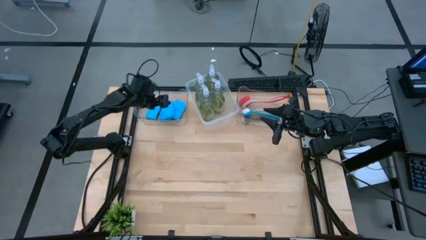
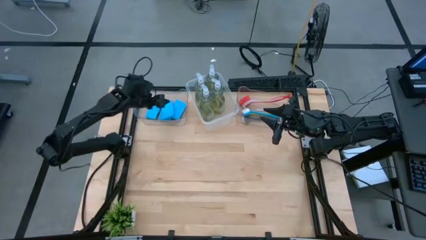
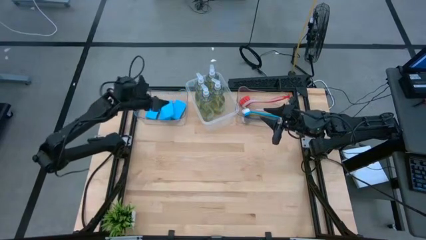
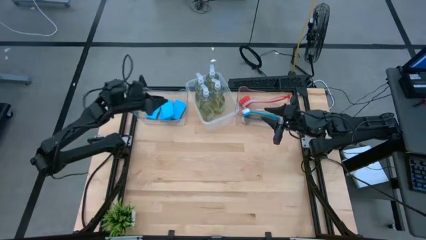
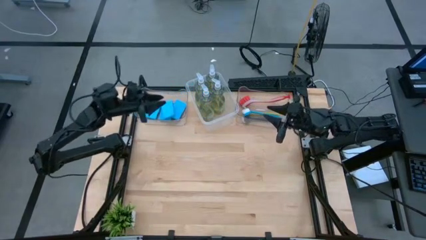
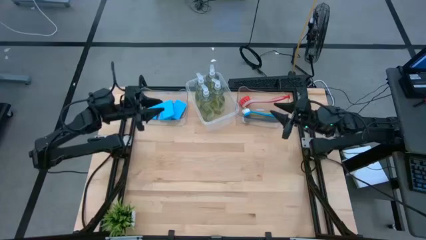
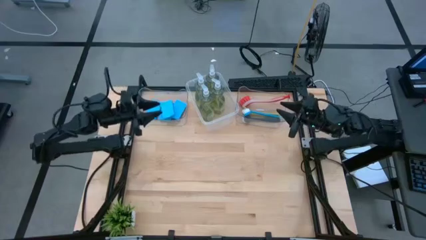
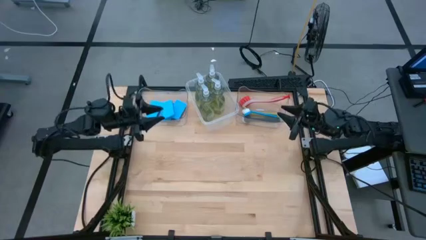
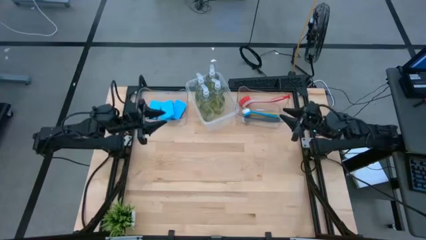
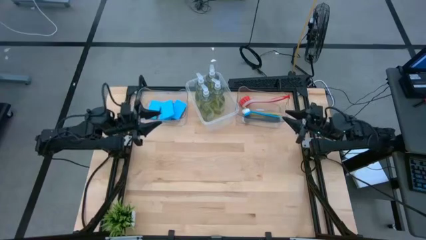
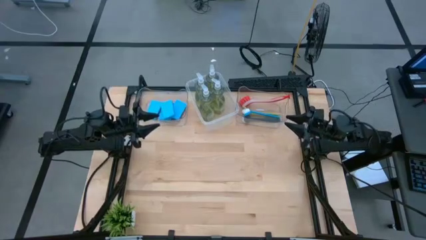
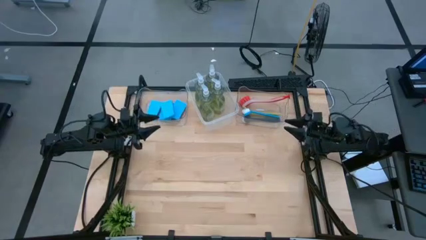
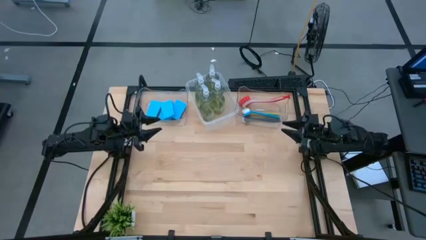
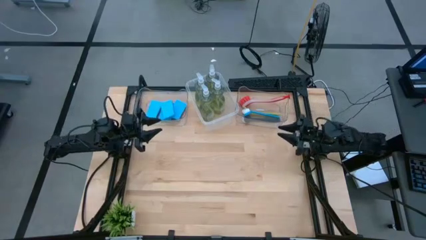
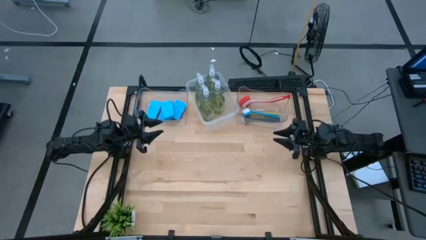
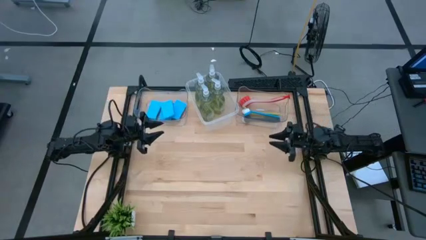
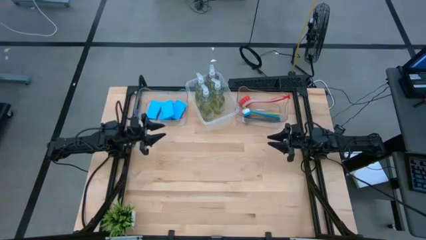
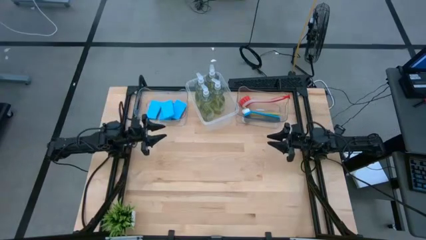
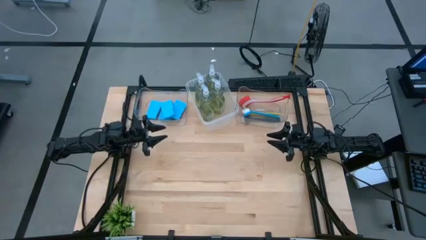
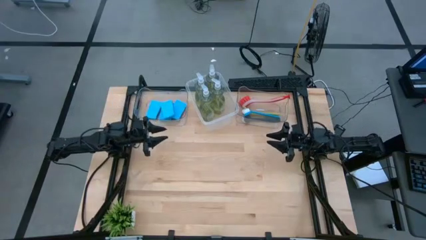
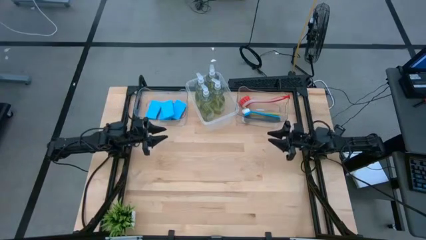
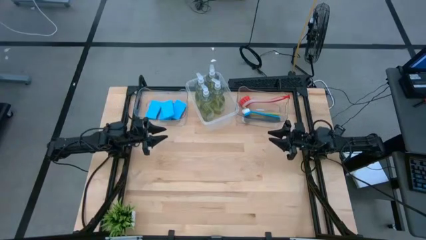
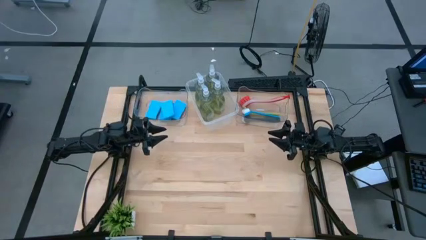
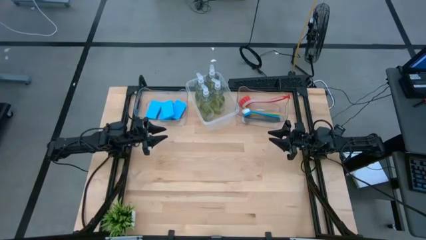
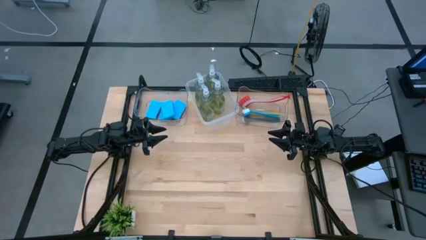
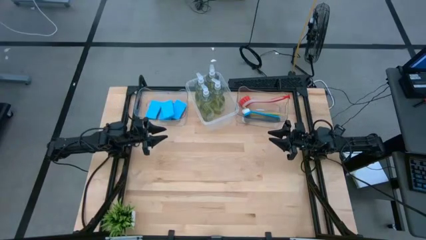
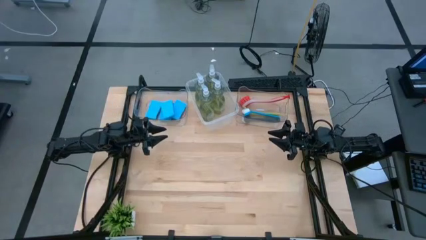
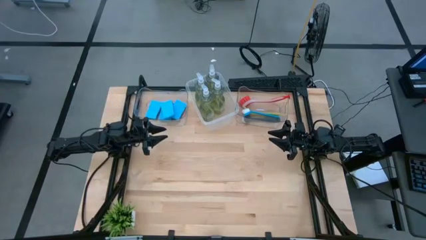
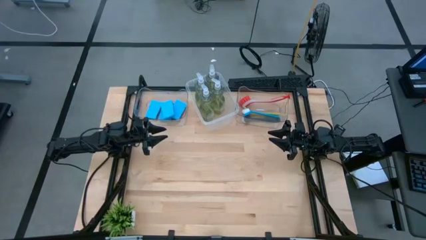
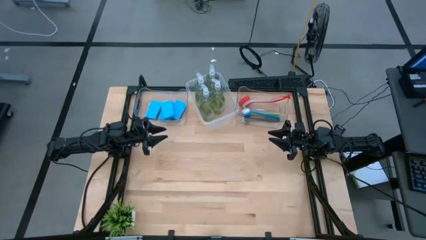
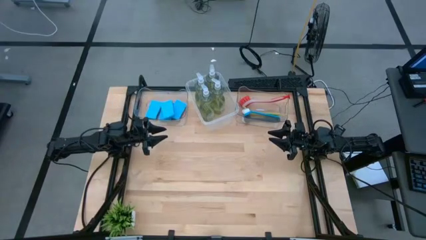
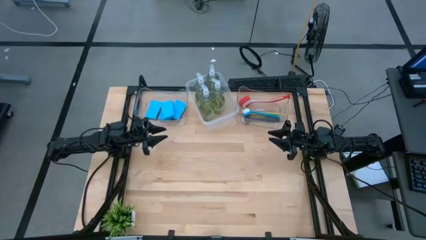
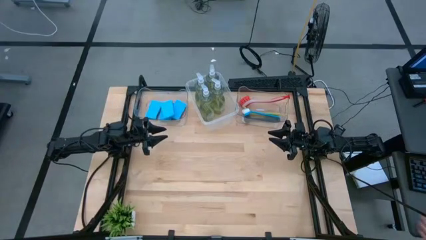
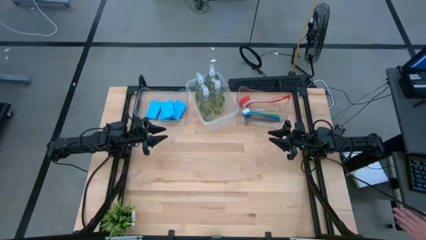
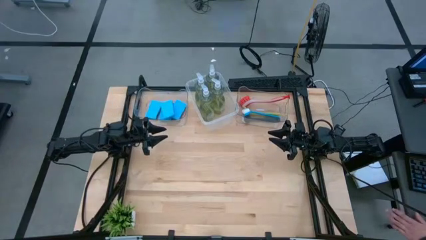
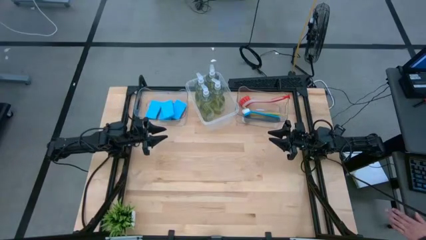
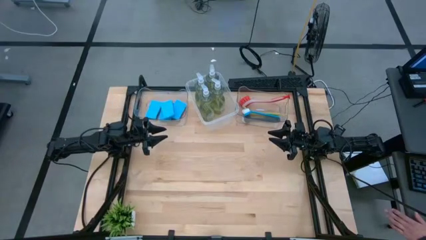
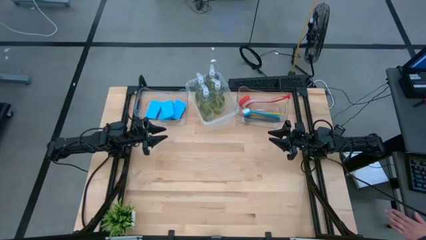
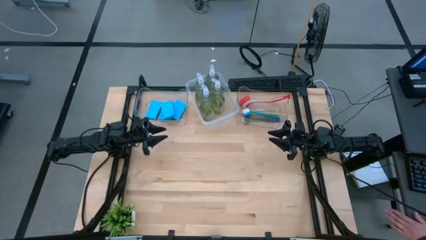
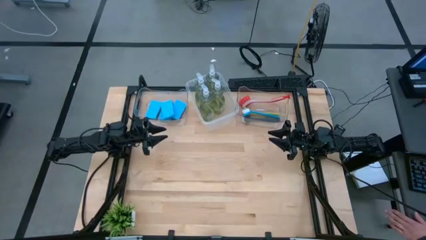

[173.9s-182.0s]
Task: Pick & Place Kitchen Sink Supplies
Return to Home Position
